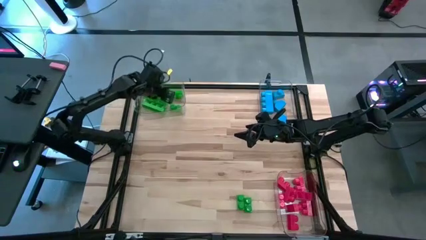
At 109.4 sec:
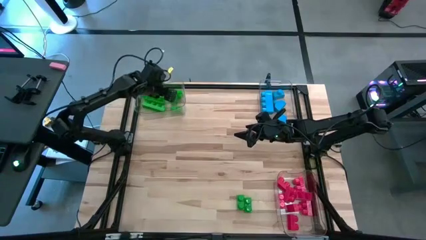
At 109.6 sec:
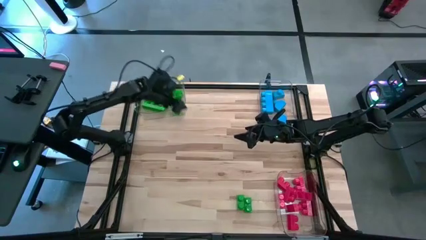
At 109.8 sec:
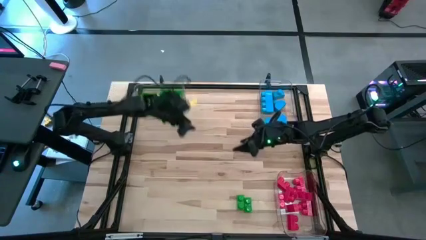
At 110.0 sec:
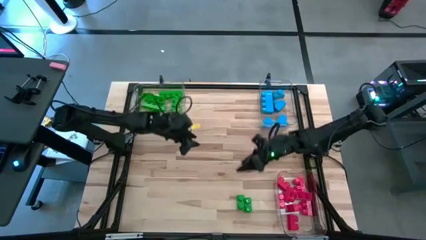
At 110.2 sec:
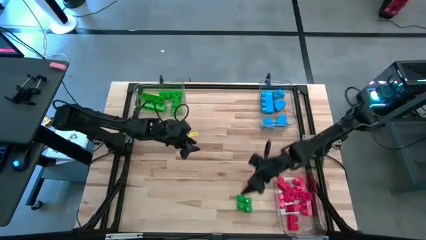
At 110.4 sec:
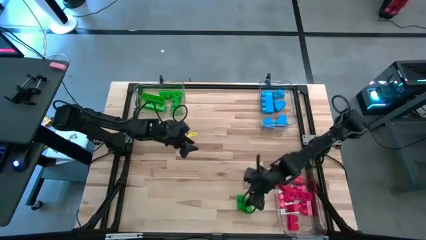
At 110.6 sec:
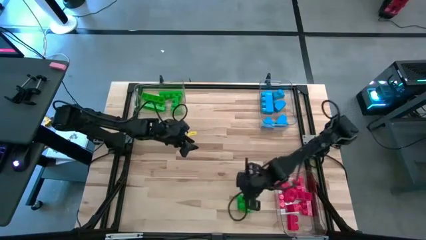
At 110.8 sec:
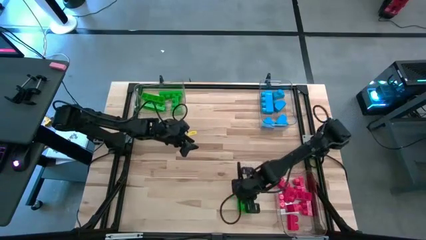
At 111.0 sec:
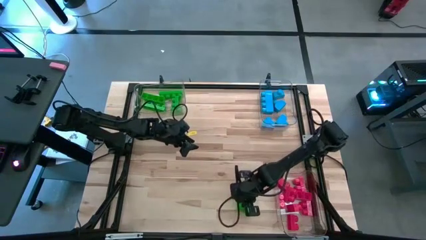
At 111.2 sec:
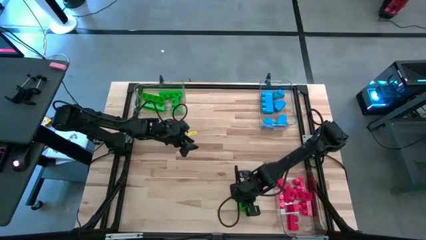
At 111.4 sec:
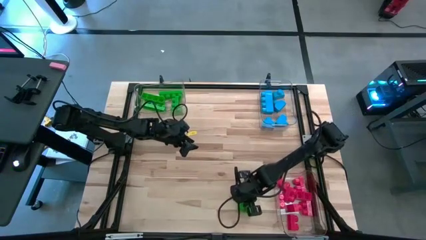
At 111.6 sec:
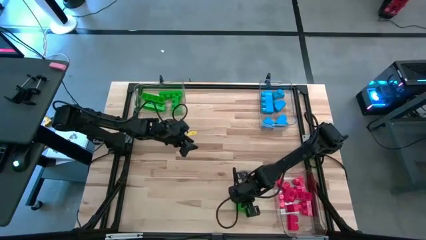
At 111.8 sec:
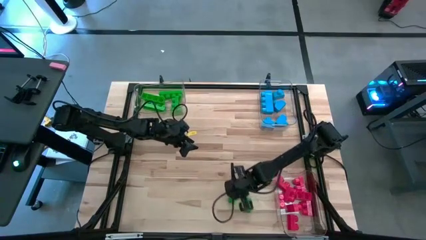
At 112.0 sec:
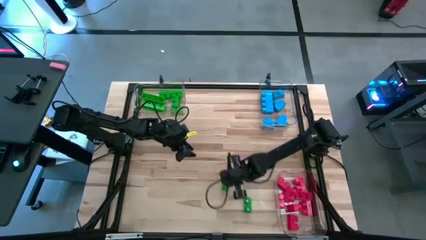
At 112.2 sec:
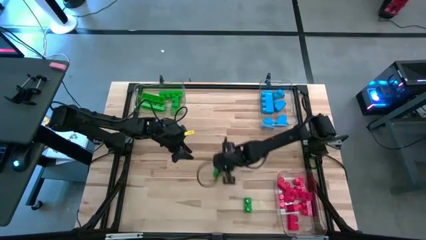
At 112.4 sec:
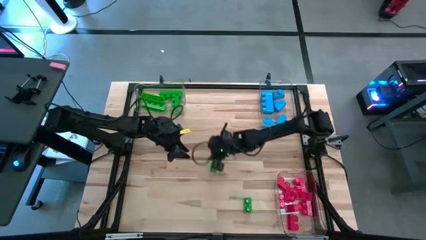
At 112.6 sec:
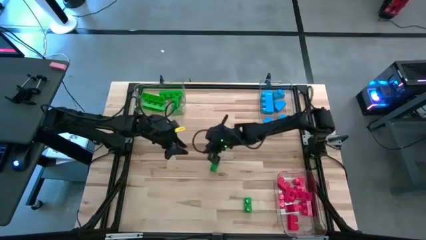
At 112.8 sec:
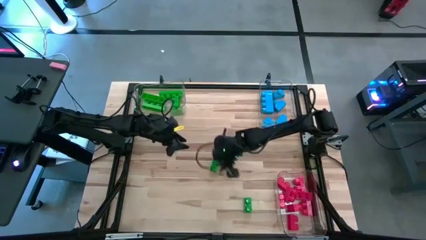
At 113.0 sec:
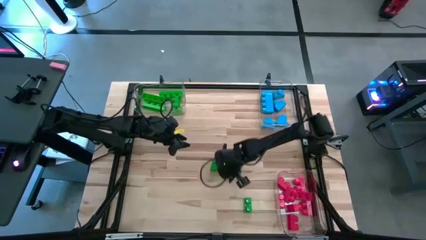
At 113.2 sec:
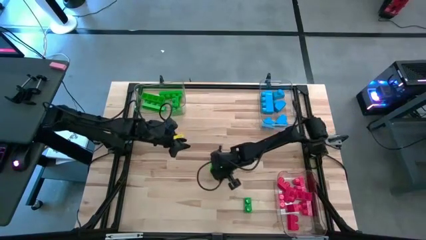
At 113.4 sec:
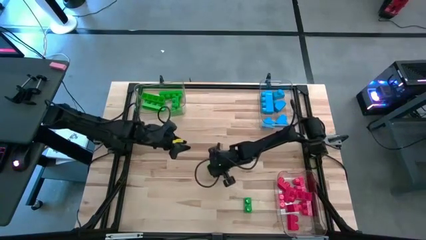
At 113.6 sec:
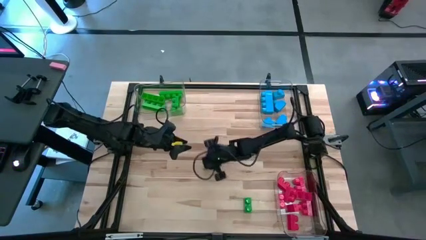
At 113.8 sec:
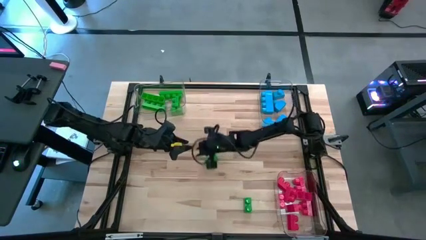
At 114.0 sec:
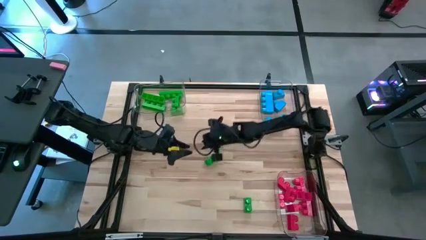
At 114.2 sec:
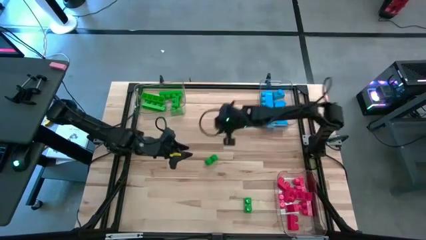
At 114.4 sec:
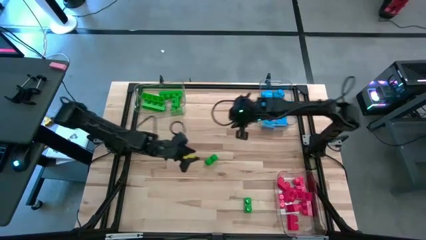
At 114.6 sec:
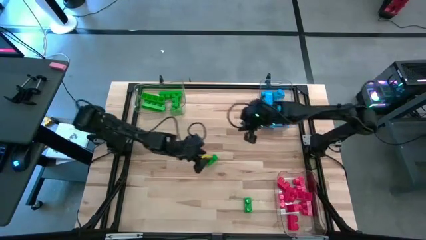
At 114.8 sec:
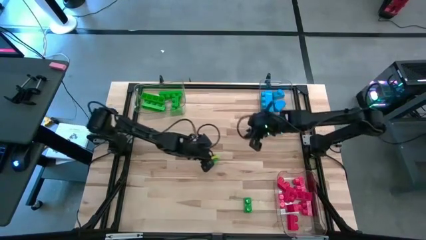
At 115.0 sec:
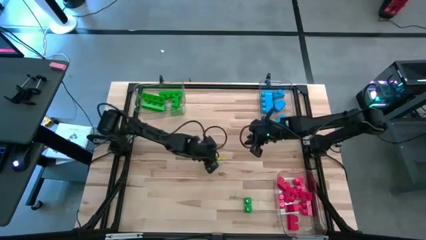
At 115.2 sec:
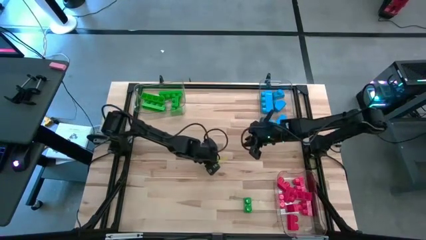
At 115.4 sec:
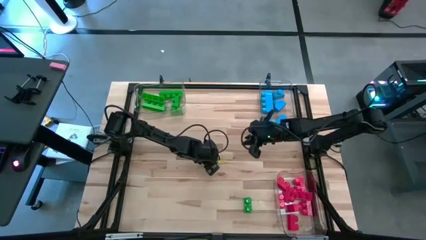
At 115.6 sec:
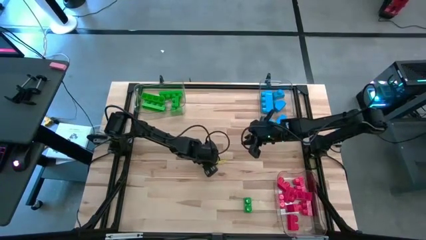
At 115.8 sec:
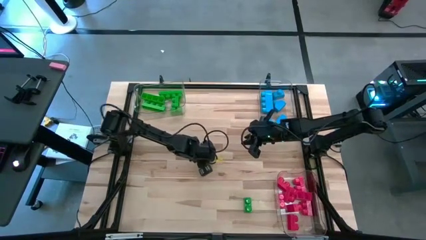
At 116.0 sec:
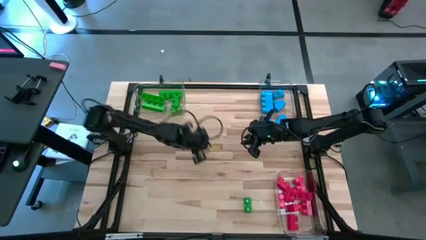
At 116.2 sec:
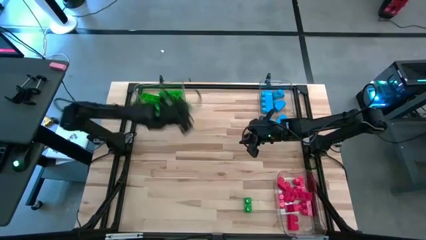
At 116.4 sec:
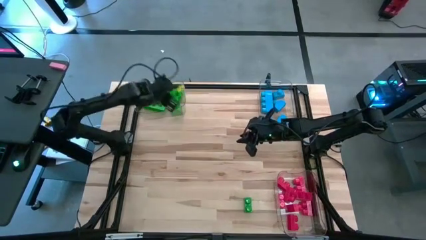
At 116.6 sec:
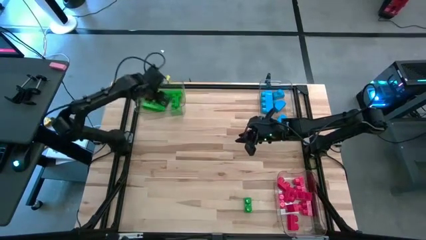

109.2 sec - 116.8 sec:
Task: Sort blocks
Put the green game piece into the top left transparent bin

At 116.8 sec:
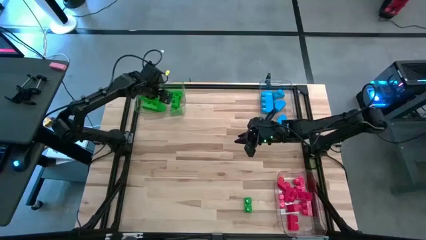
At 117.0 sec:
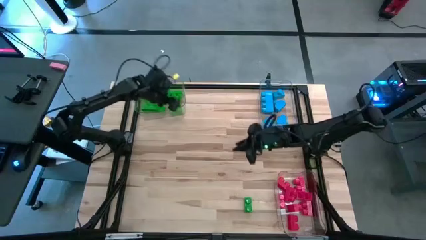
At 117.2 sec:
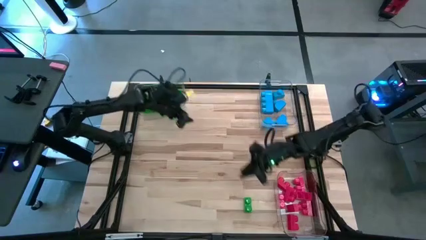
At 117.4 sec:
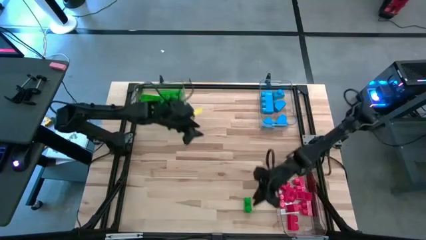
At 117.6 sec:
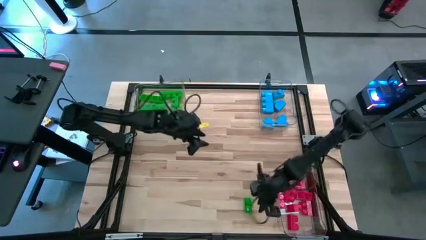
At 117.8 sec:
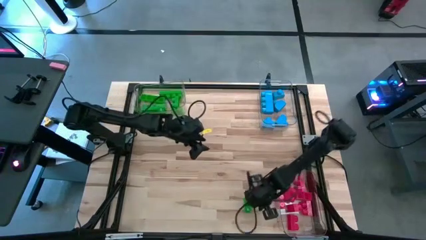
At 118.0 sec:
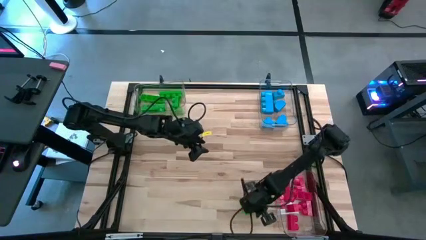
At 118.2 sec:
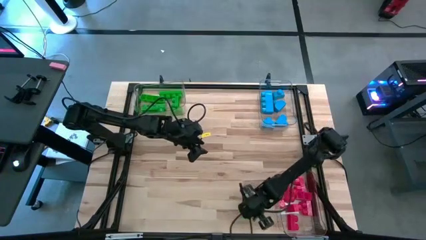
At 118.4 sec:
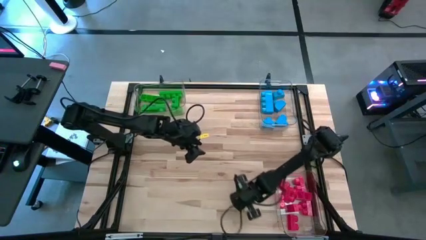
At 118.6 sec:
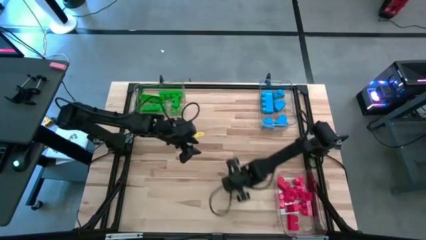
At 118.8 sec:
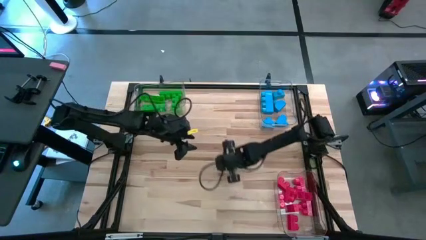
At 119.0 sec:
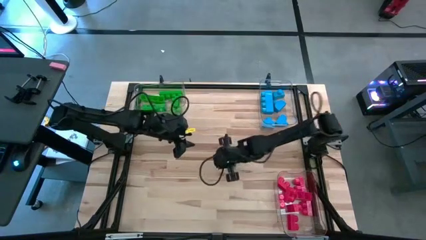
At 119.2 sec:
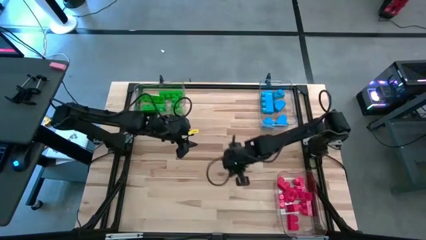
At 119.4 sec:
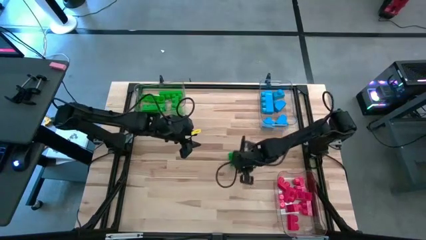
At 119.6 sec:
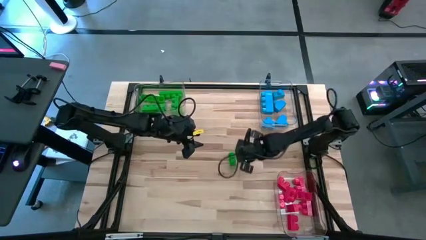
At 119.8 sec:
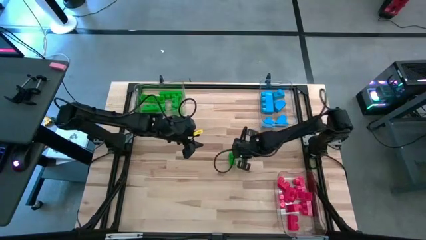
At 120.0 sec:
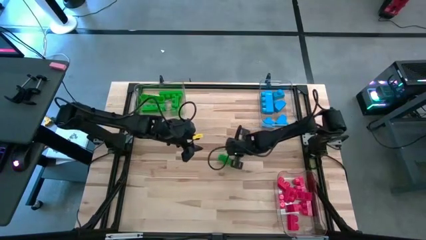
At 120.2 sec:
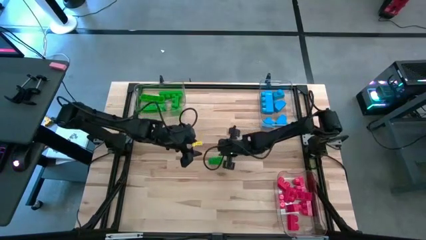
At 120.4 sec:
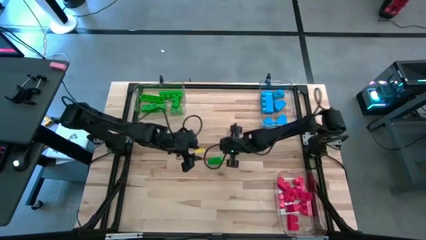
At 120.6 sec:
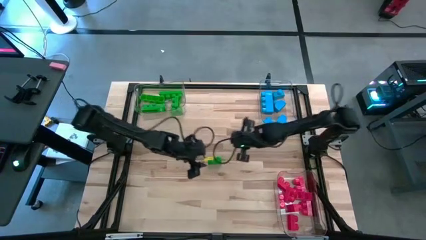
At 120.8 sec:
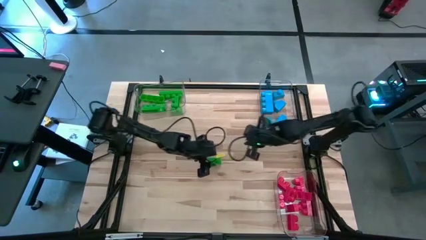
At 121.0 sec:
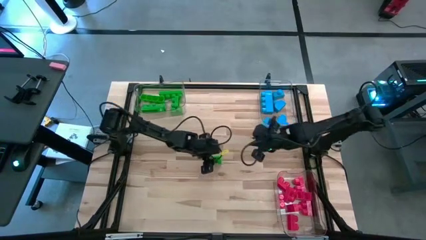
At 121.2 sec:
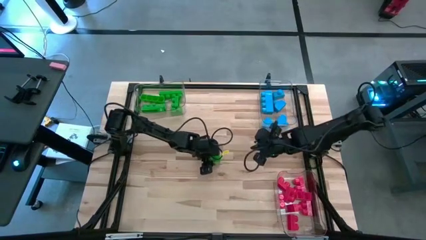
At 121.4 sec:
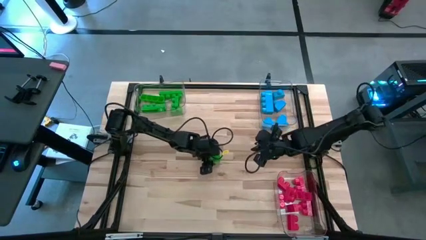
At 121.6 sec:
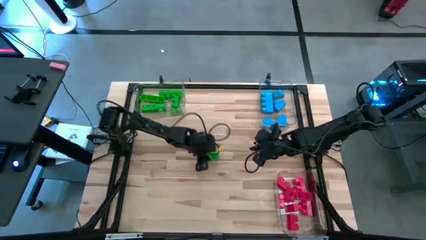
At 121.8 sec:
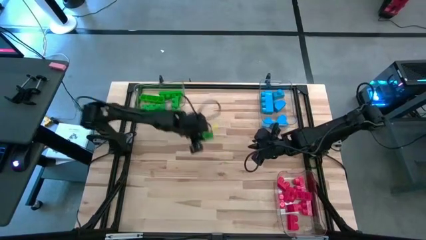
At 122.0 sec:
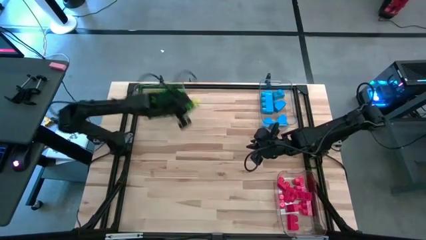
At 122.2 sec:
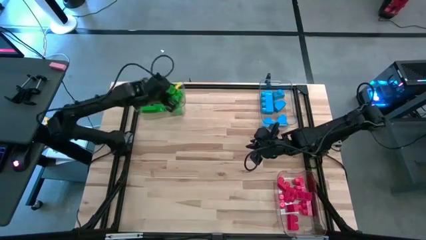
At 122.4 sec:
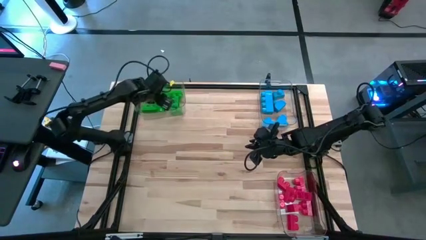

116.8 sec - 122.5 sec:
Put the green game piece into the top left transparent bin

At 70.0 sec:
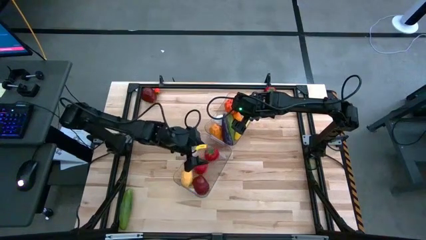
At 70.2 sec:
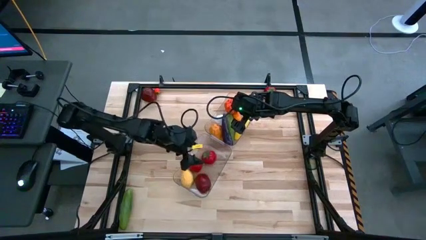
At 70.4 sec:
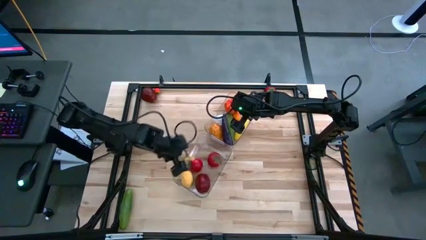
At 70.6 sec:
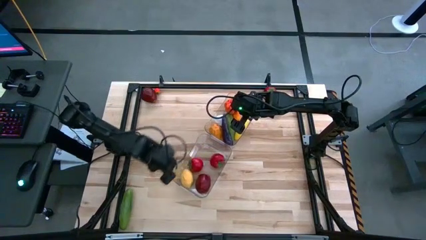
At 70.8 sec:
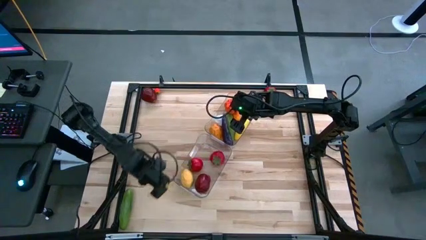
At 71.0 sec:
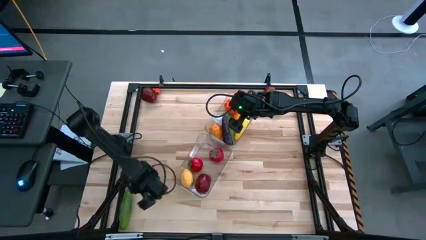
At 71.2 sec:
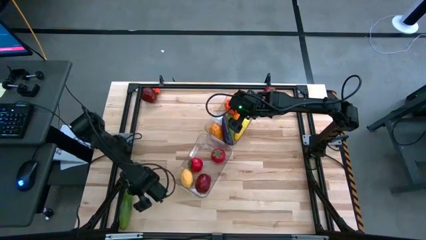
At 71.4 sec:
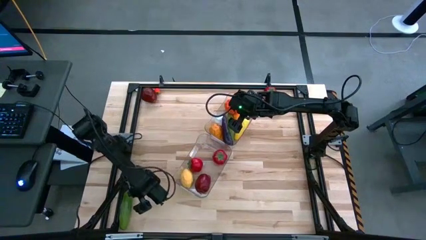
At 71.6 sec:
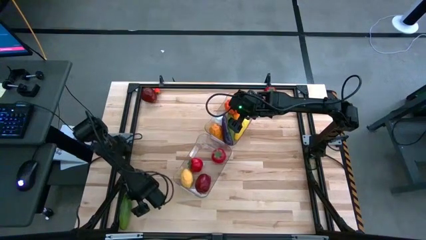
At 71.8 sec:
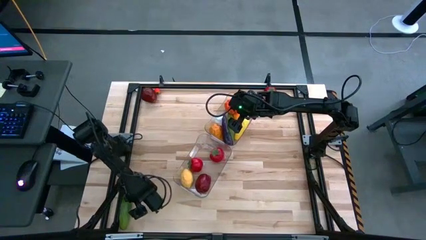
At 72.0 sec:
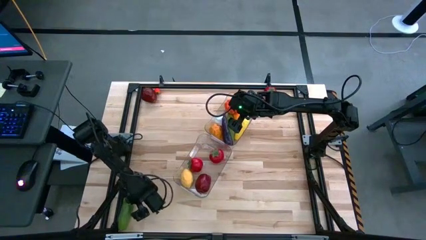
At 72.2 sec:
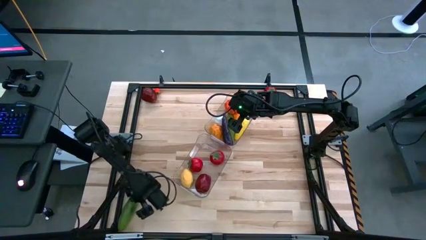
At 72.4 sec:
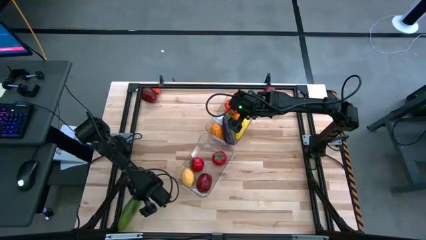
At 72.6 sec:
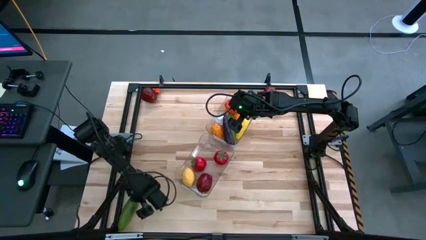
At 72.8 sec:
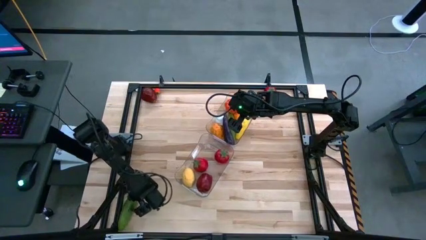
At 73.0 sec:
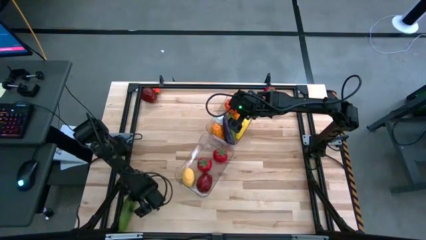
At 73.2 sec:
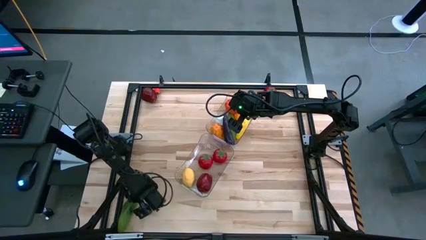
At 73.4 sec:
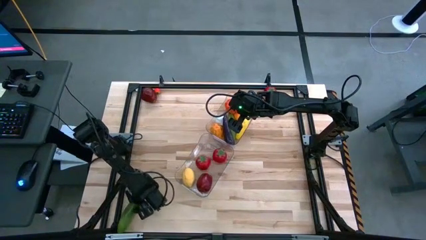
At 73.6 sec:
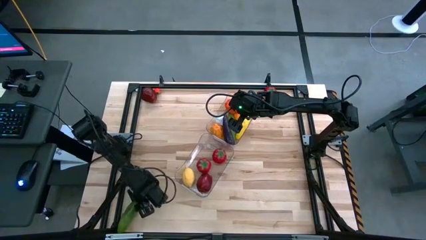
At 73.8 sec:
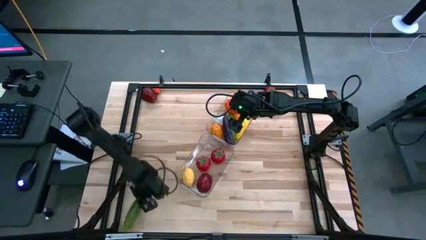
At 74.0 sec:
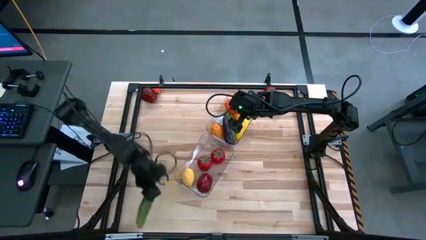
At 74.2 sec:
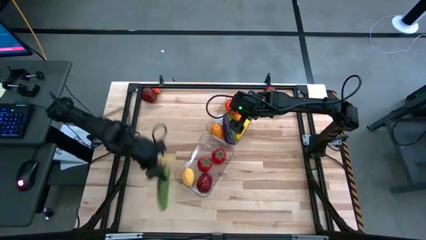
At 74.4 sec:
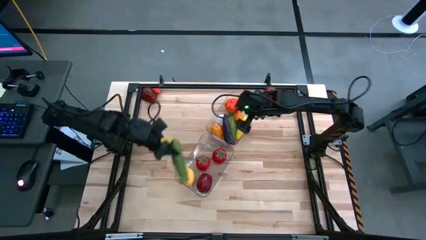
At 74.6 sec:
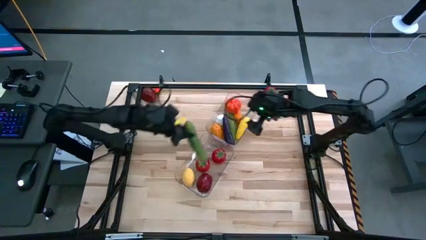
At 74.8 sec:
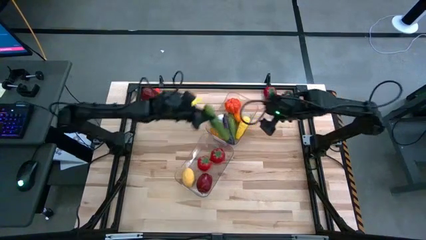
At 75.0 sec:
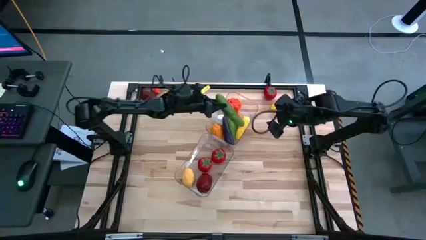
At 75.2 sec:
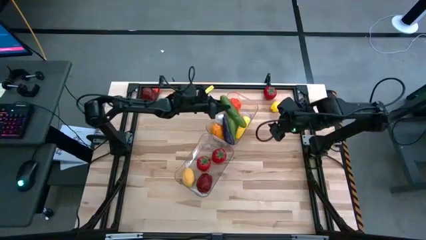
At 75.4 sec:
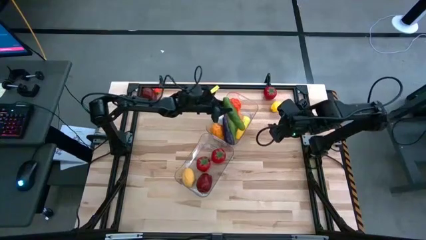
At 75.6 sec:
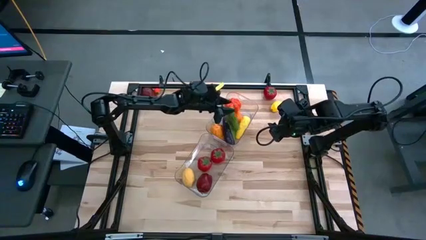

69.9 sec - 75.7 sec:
Task: Sort produce into baskets
Put the green cucumber into the top transparent bin
